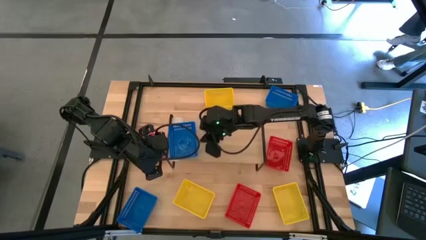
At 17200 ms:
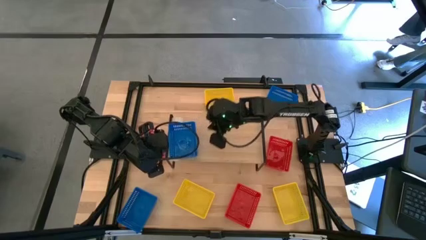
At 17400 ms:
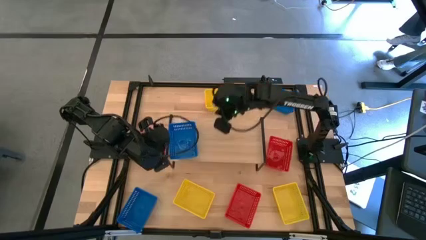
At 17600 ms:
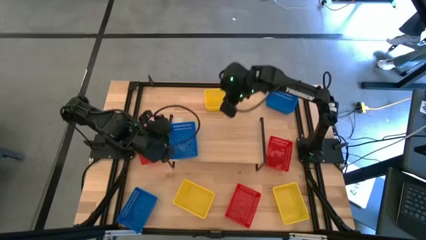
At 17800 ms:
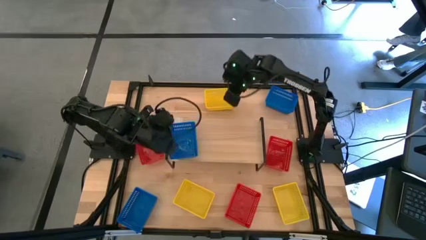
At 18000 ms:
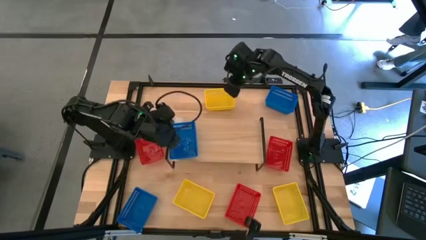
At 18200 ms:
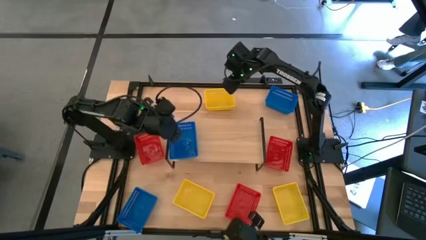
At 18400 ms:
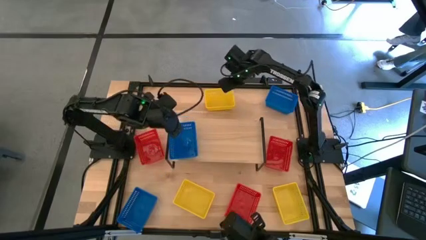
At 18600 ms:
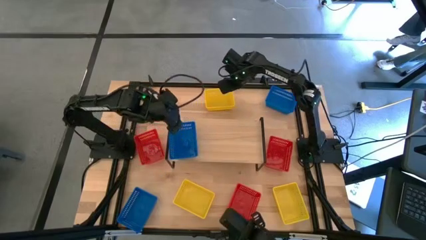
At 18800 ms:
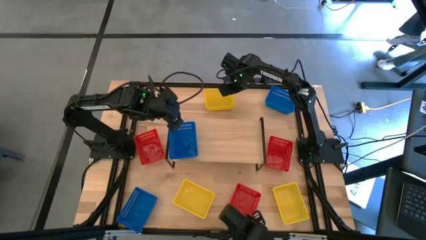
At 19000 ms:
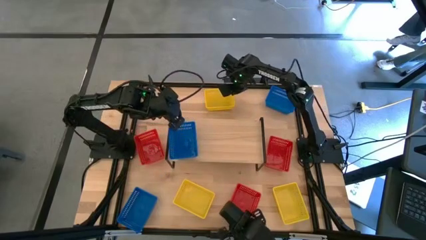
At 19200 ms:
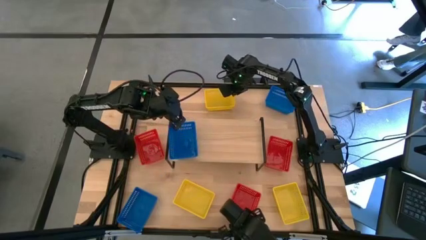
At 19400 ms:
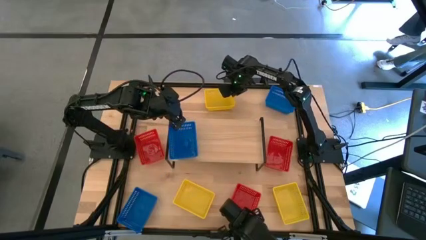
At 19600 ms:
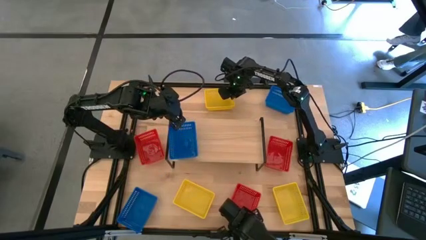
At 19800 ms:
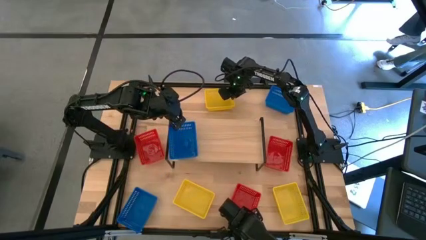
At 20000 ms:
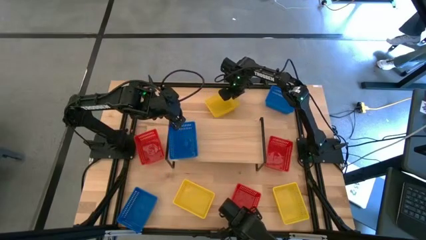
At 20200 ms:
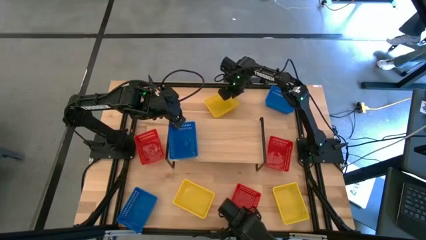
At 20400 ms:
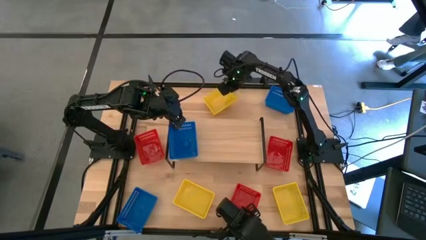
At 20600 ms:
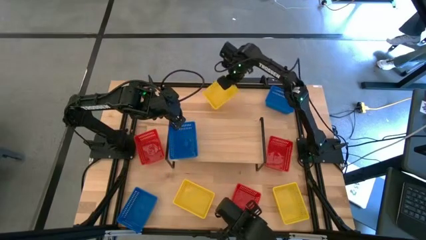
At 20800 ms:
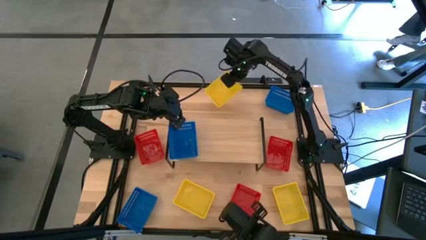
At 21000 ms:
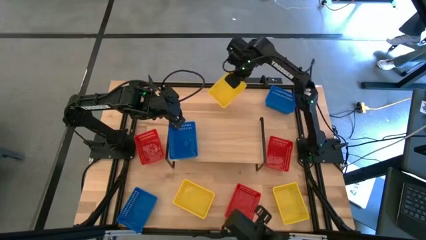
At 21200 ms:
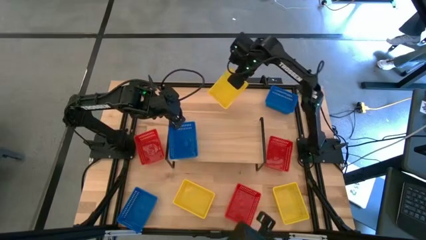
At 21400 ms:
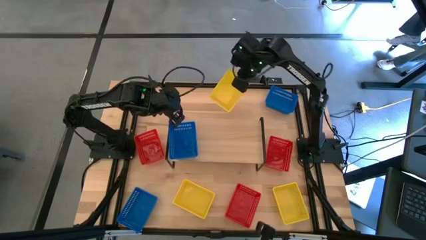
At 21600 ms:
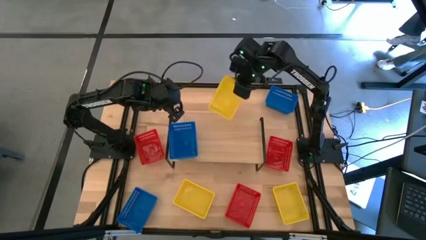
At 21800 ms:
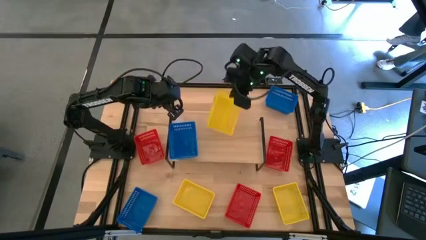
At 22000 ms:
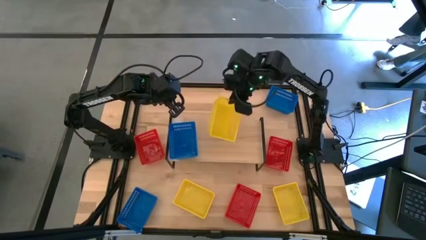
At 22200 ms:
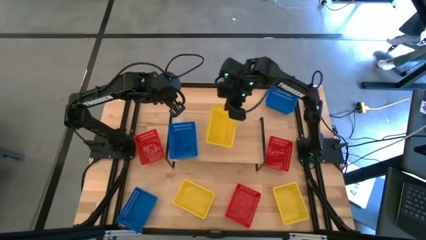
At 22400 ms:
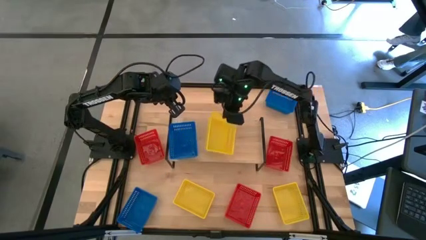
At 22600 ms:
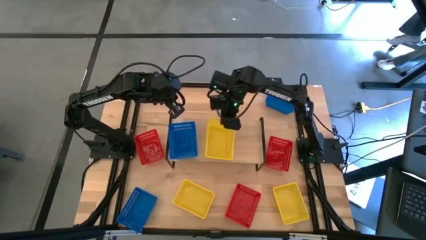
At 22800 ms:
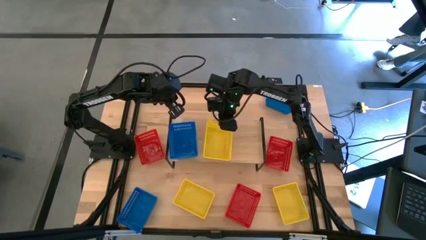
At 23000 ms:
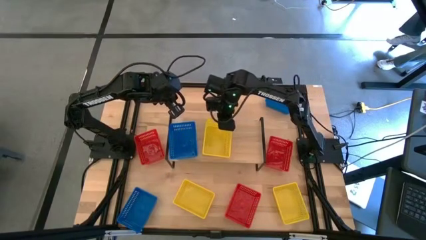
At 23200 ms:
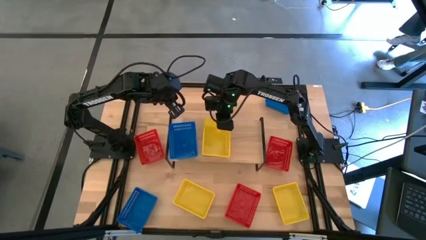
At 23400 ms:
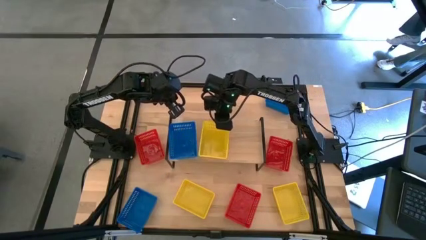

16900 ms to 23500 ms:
Task: Stack baskets on shelf by color
Put the top yellow bin on the shelf

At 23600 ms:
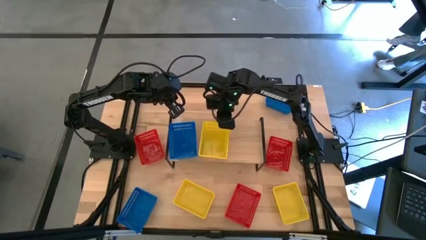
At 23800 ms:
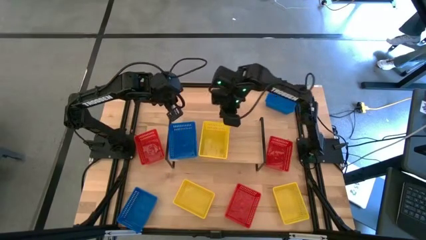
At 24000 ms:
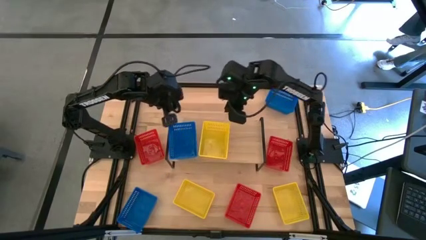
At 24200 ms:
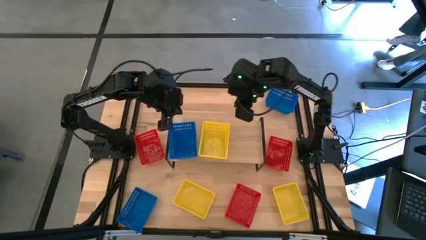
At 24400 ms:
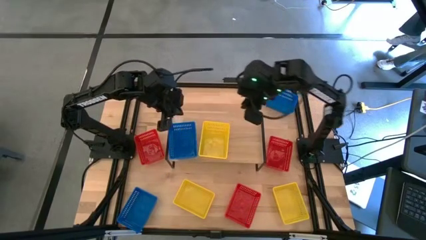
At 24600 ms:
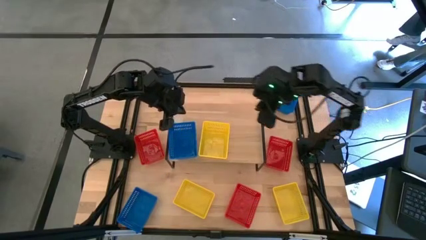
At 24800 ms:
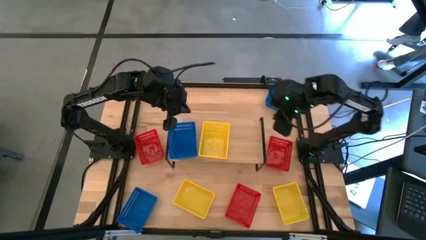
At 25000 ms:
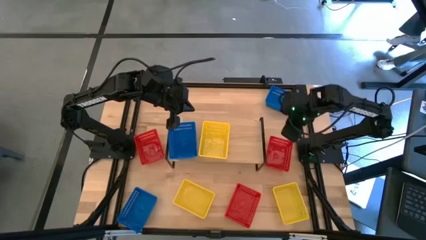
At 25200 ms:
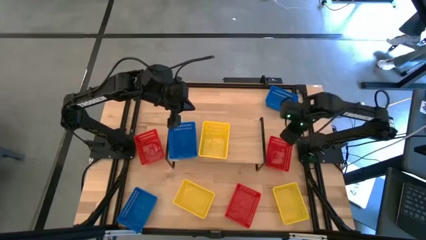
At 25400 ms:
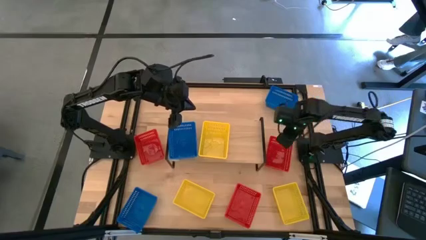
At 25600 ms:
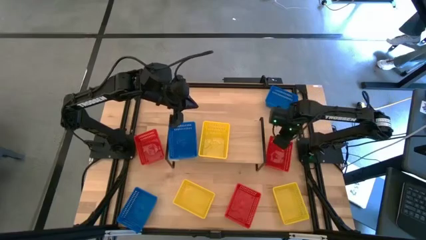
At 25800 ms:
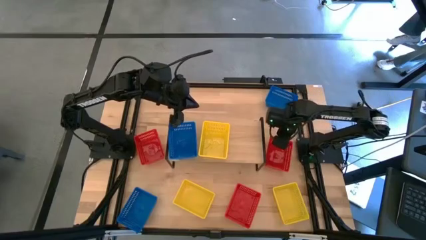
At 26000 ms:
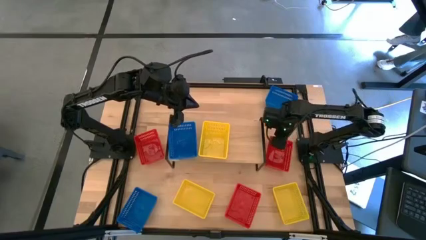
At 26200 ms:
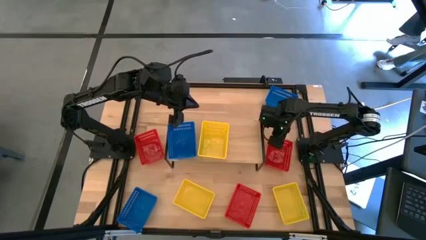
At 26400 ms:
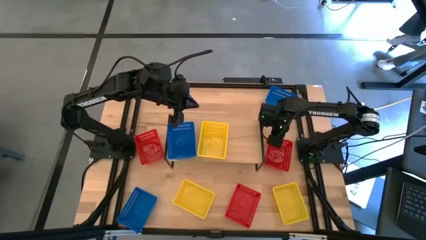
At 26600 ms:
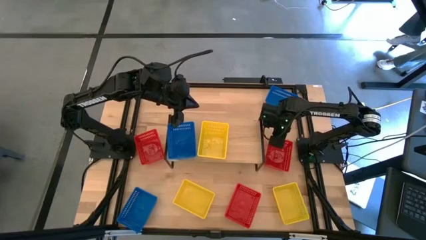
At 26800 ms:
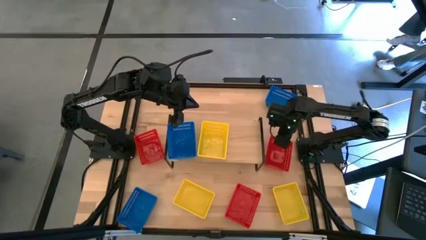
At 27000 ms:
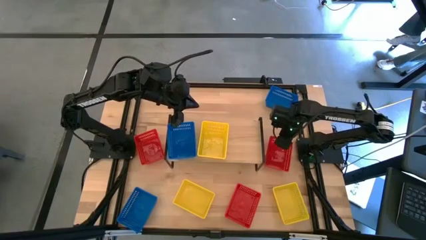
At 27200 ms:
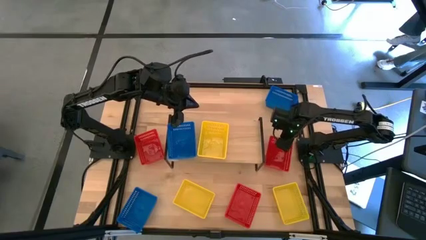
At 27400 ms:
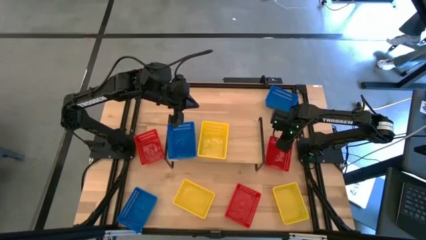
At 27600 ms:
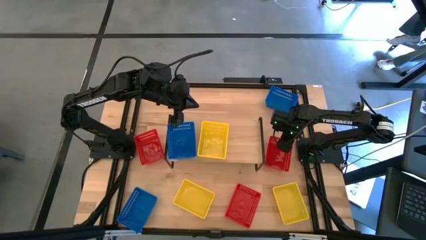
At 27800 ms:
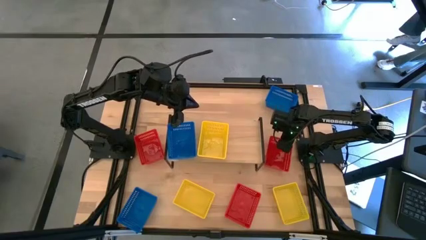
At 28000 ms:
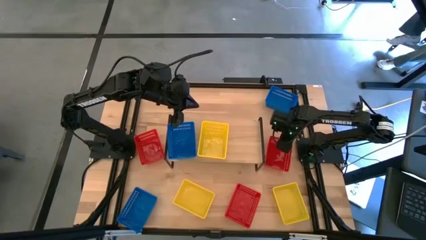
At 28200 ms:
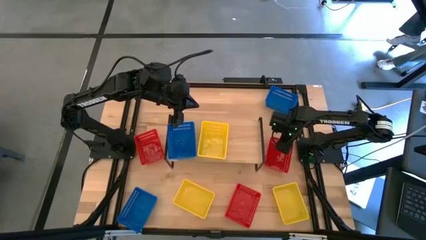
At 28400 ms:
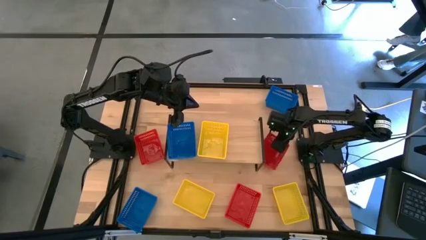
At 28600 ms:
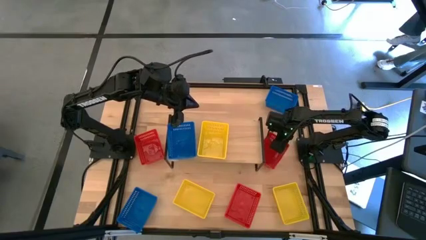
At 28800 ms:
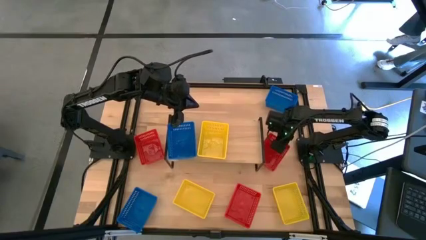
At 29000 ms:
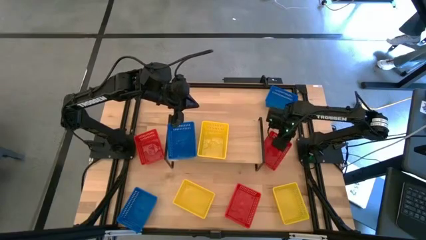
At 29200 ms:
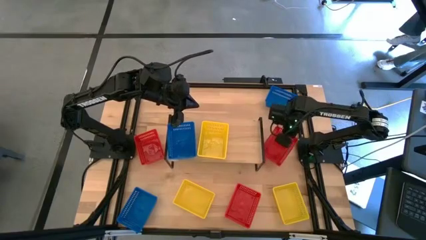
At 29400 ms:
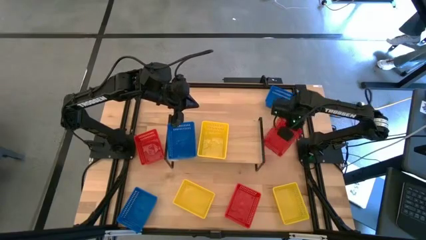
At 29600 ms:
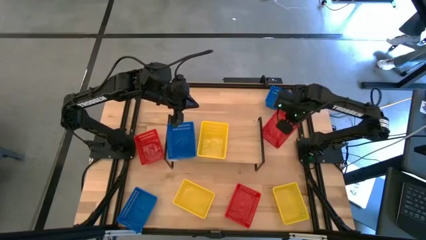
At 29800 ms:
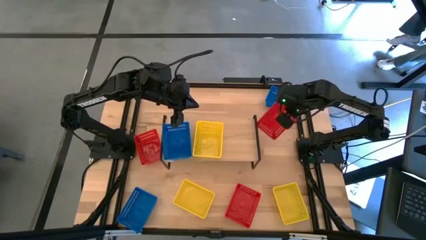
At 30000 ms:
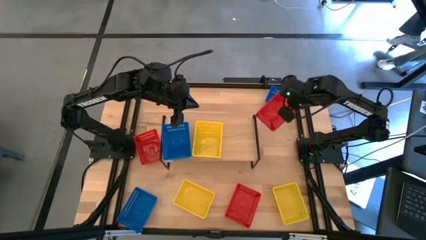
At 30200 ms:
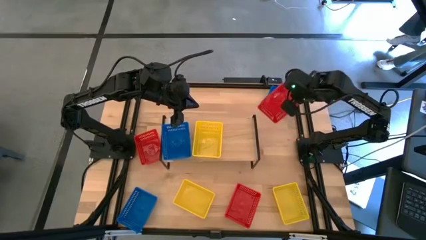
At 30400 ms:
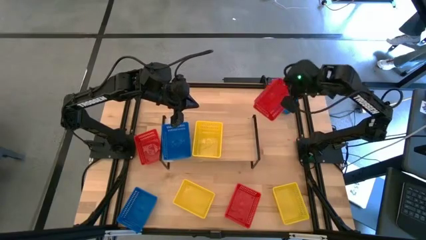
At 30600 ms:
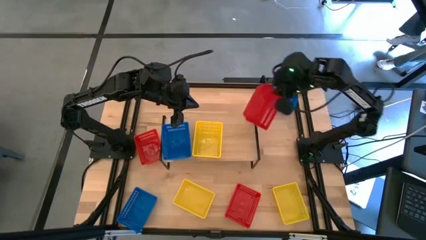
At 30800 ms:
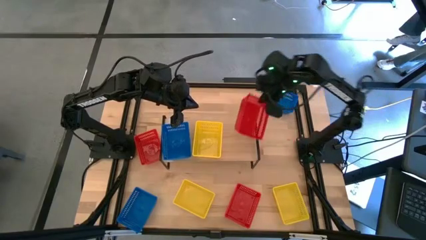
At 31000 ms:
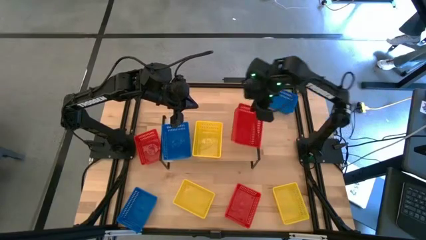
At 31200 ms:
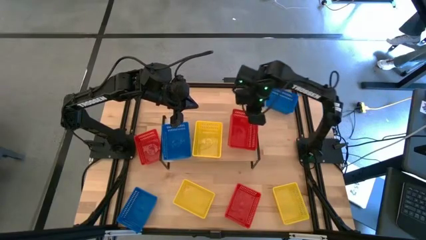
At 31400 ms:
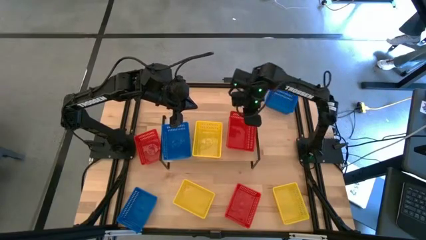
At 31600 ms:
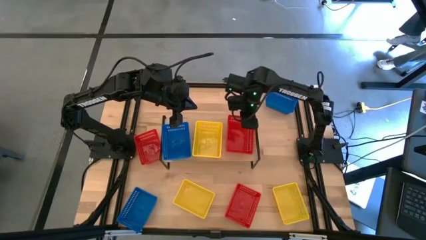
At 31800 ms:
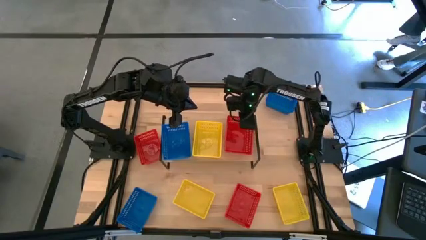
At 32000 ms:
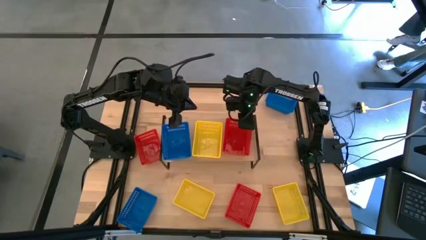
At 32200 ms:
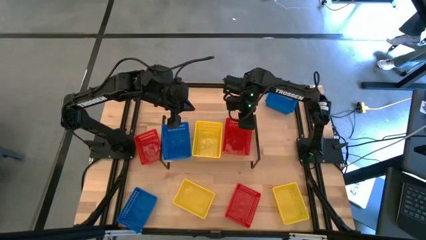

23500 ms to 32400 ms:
Put the top right red bin on the shelf
